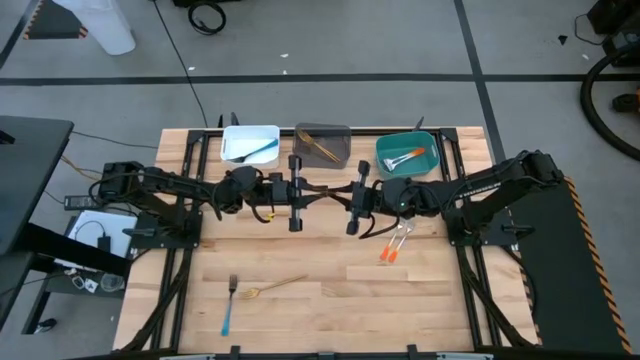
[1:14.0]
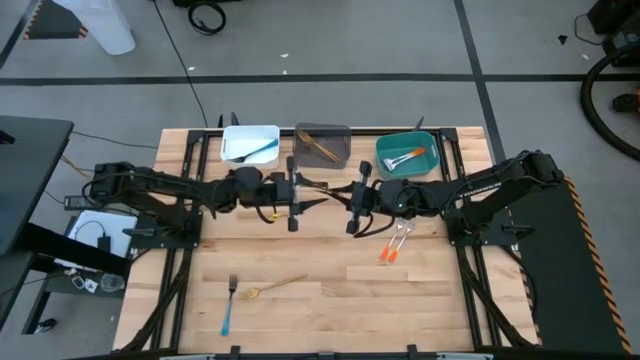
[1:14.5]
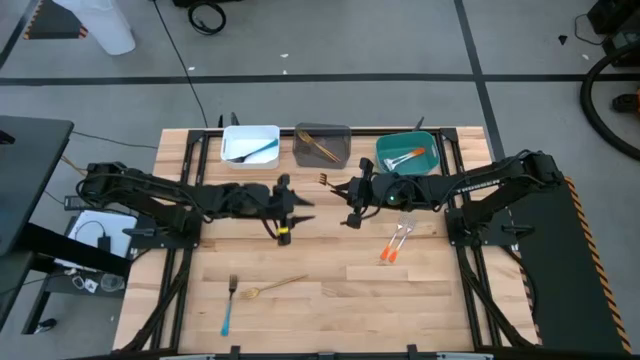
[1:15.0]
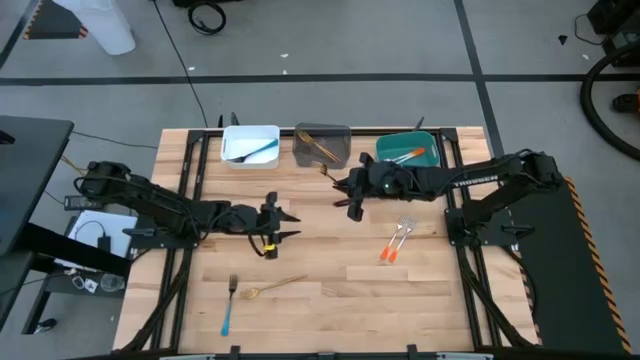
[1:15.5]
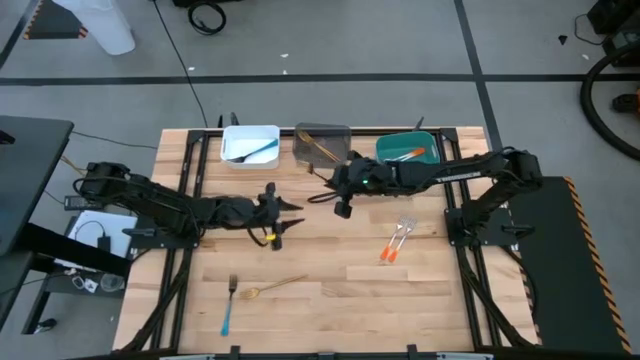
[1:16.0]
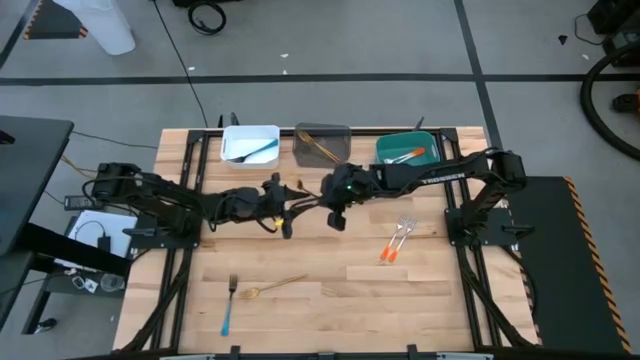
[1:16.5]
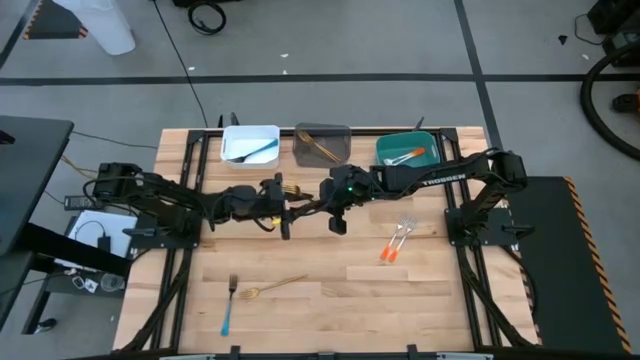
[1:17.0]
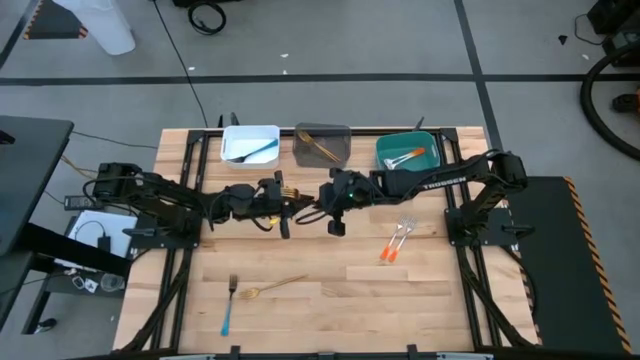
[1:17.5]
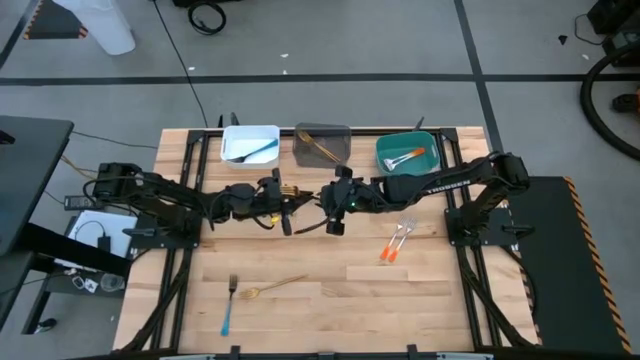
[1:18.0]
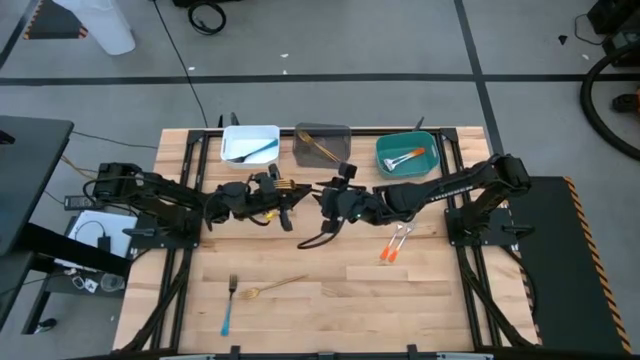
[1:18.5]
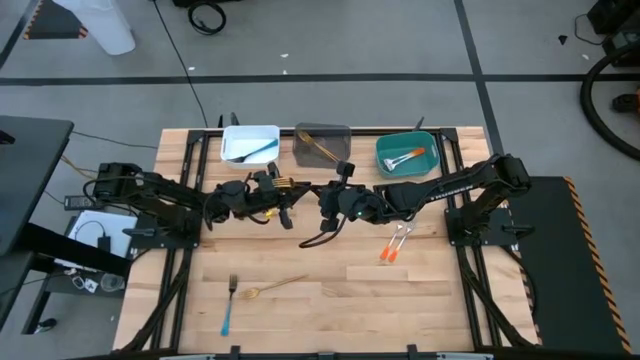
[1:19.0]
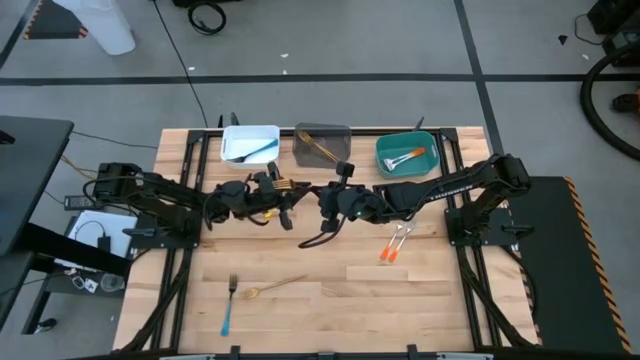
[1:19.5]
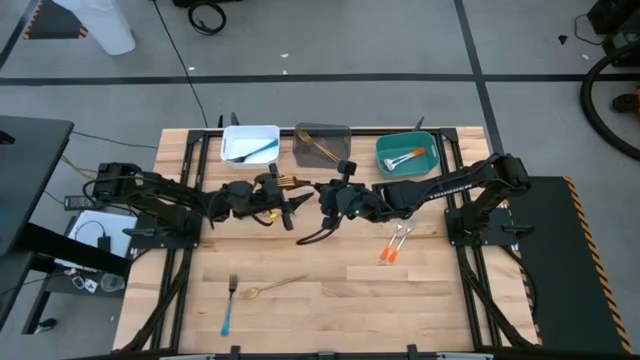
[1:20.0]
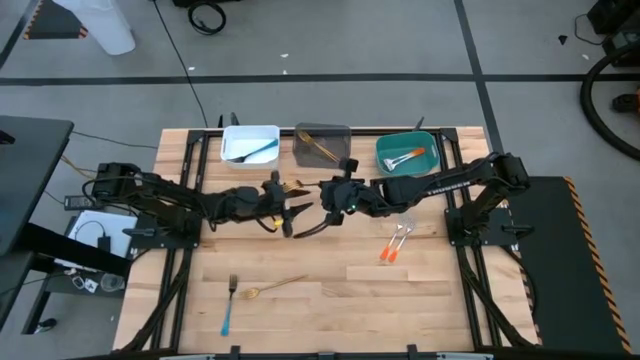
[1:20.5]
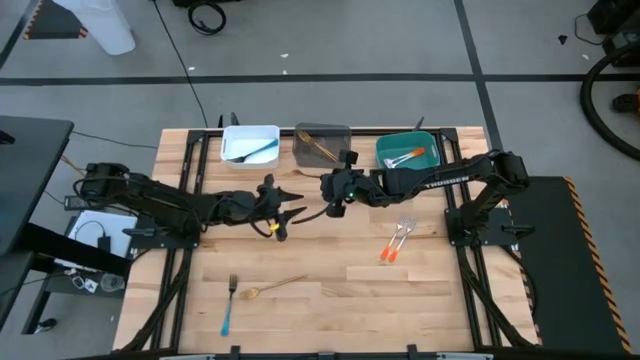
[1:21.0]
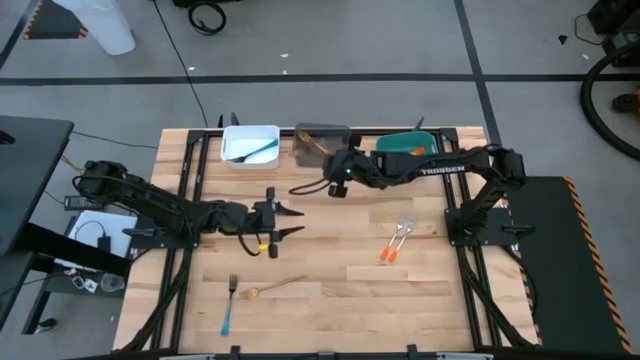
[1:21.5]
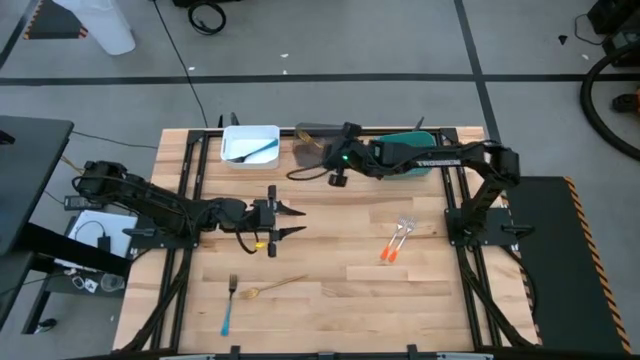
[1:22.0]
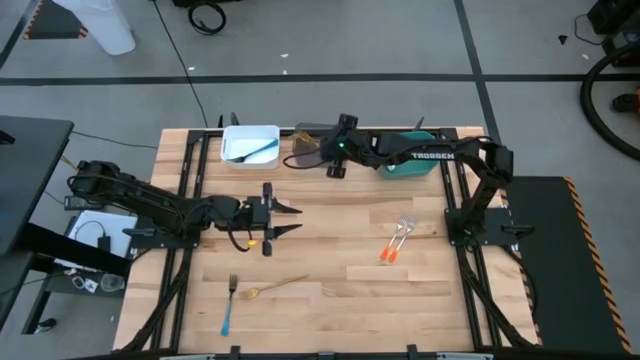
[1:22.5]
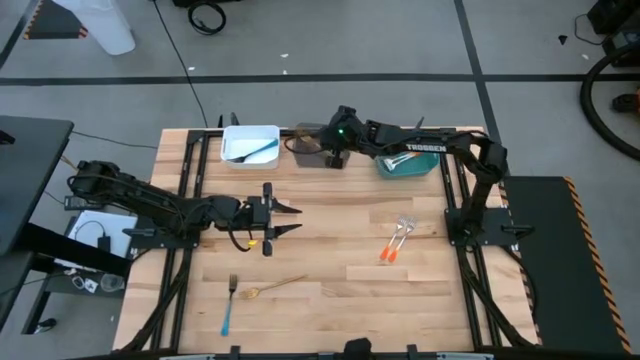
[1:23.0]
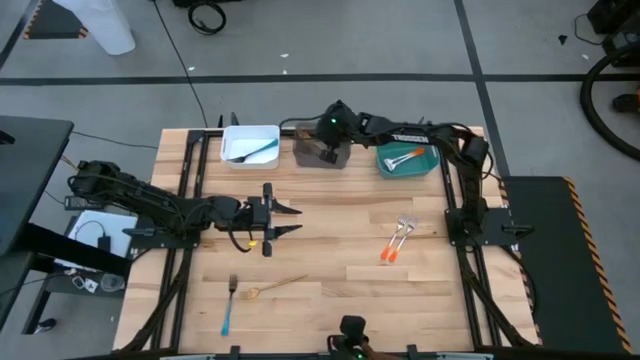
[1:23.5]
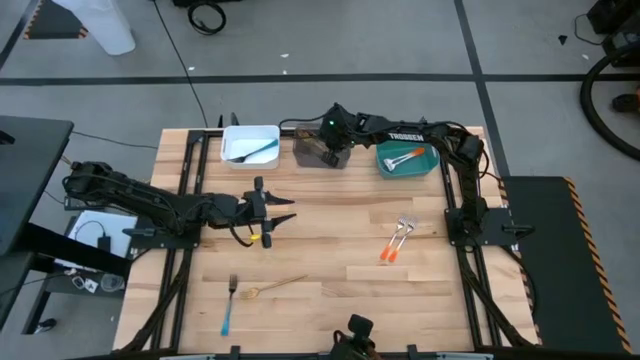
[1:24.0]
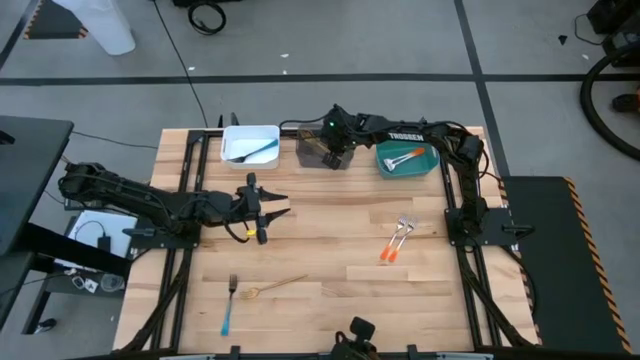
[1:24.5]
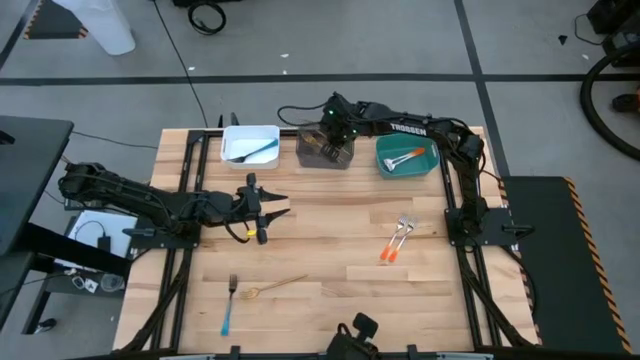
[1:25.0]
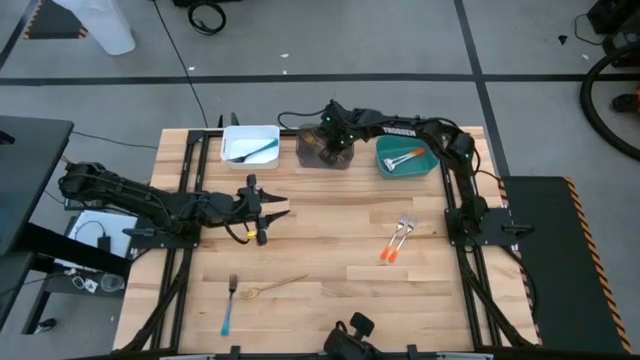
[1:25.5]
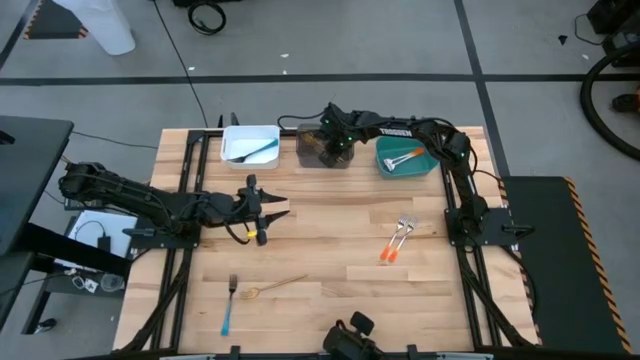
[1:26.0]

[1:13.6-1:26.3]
Task: Sort silverware by color (type)
Put the top gold fork into the black bin
